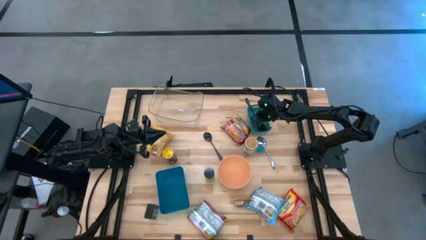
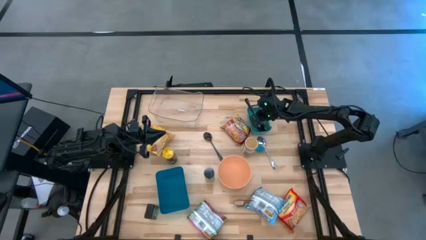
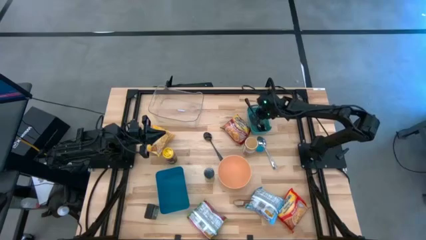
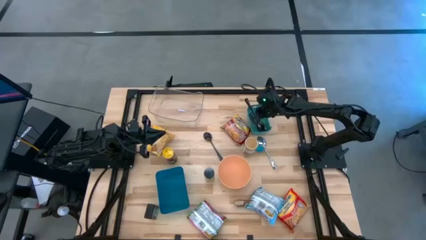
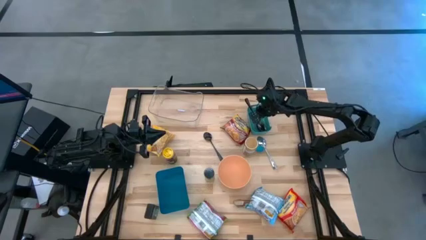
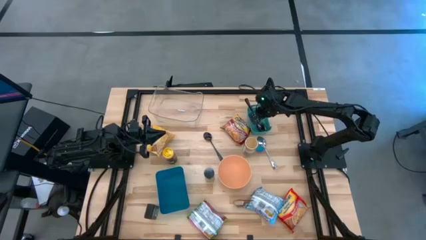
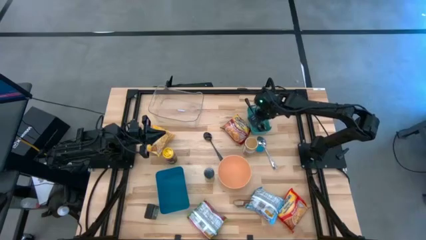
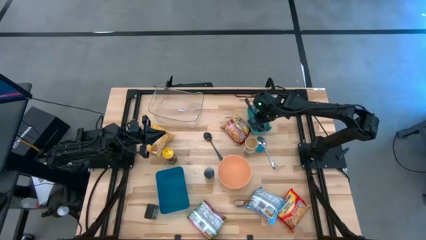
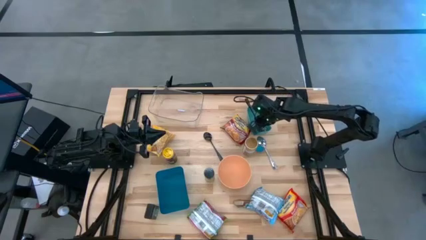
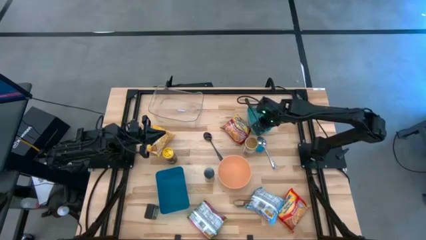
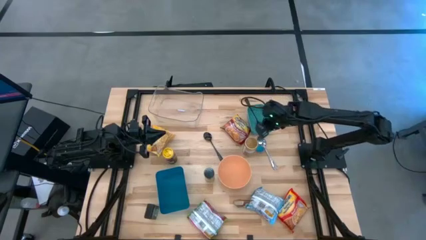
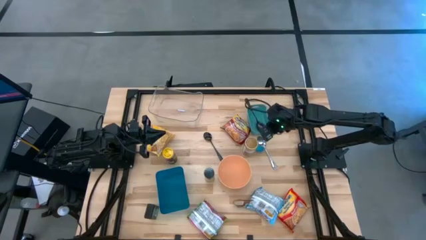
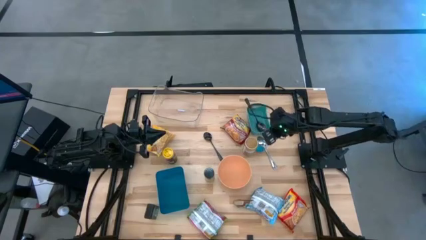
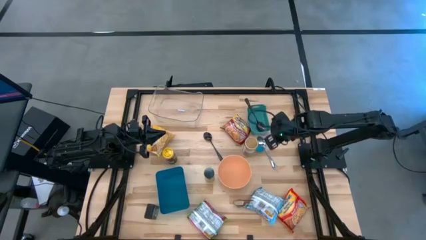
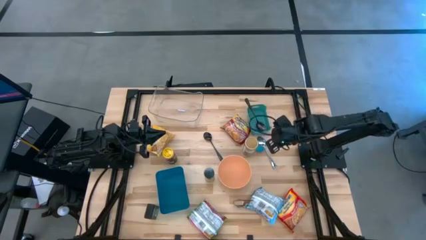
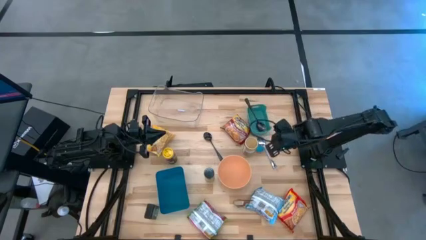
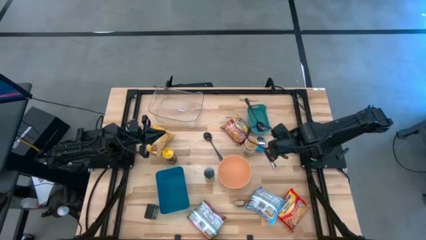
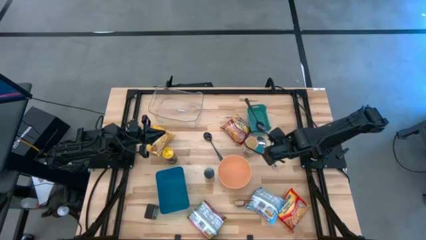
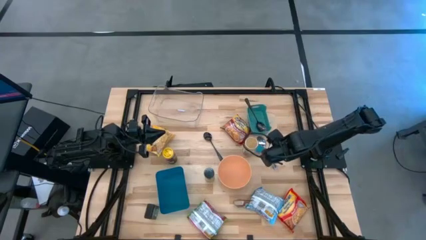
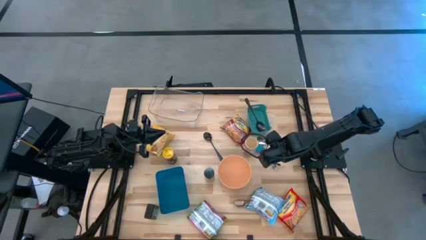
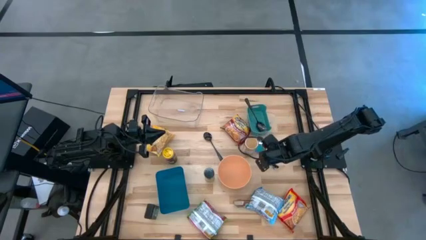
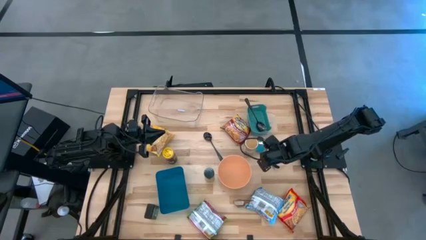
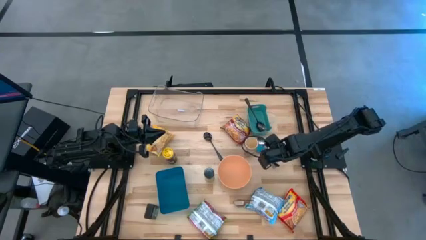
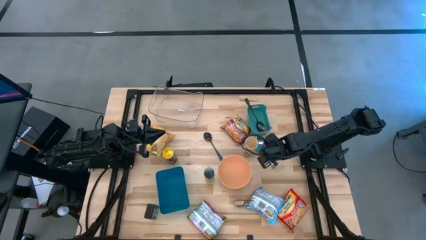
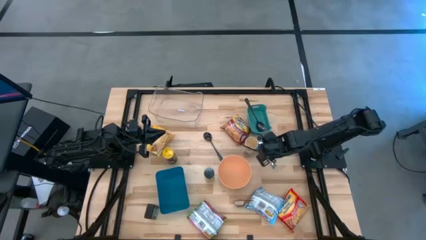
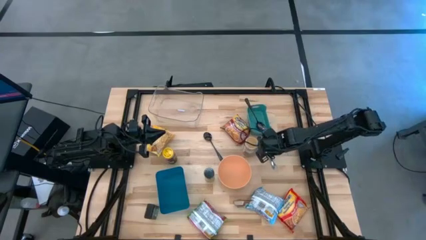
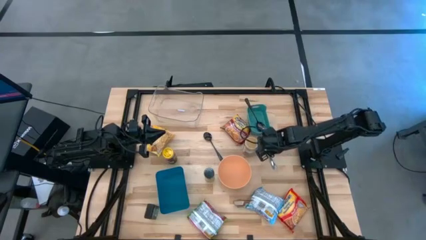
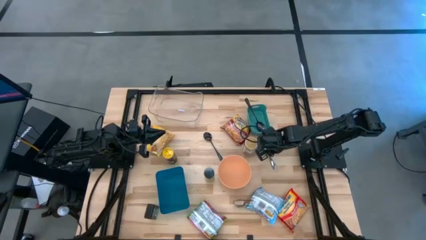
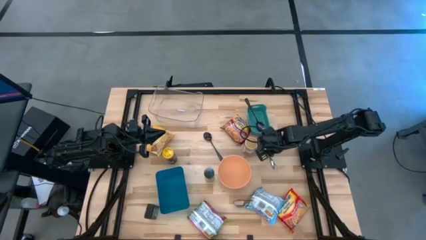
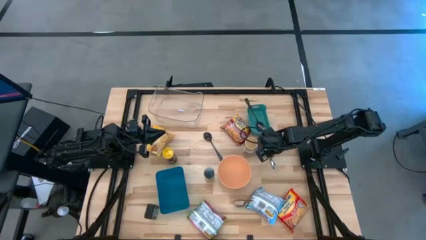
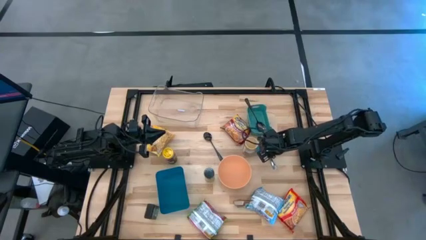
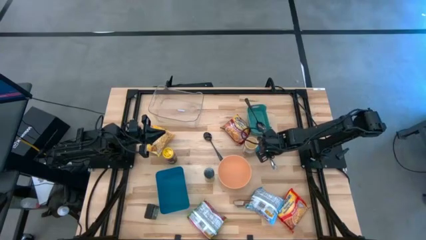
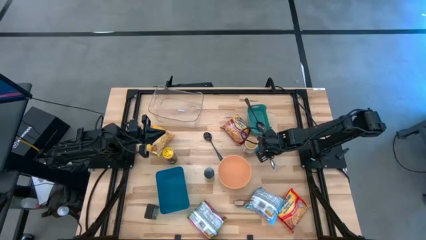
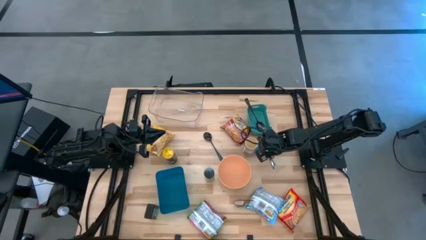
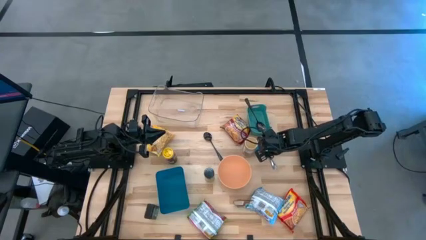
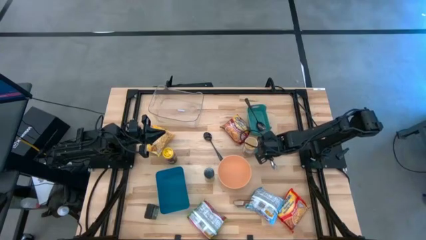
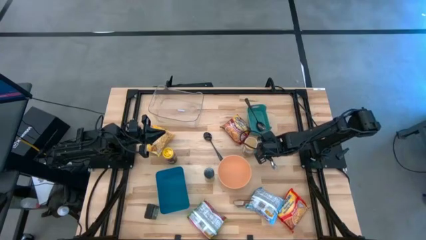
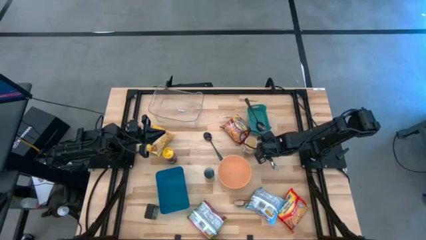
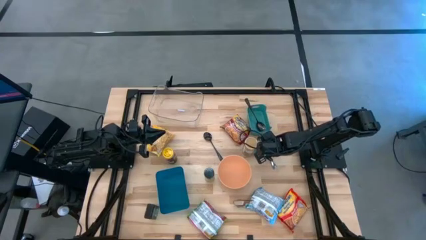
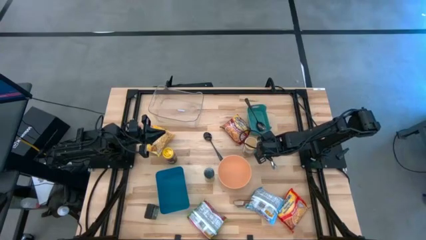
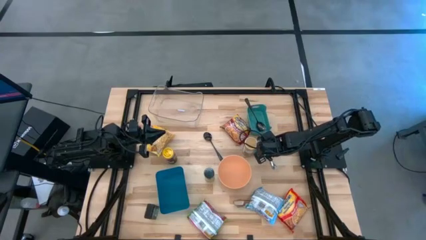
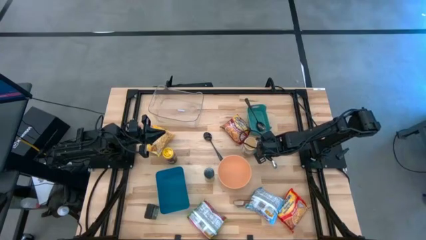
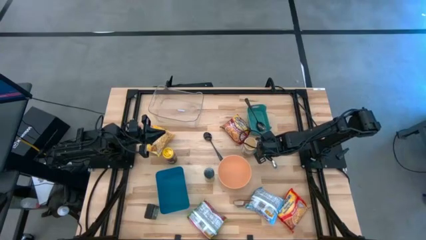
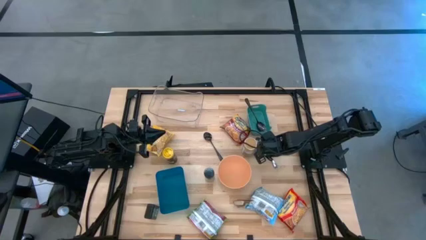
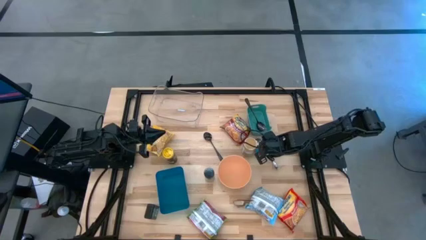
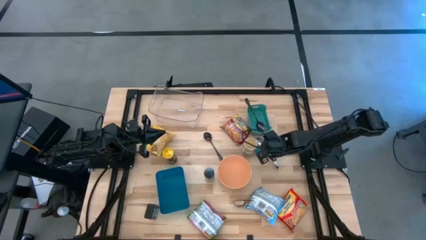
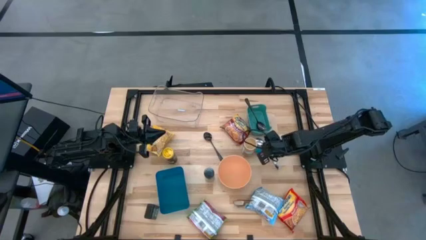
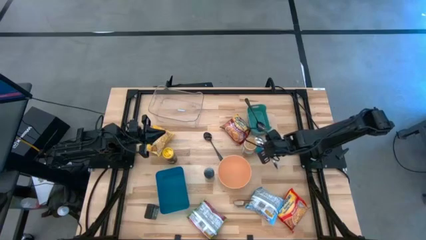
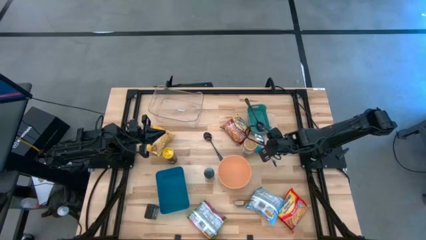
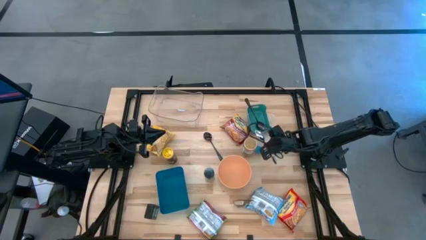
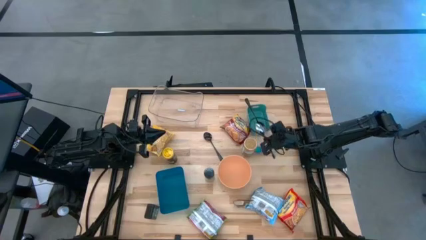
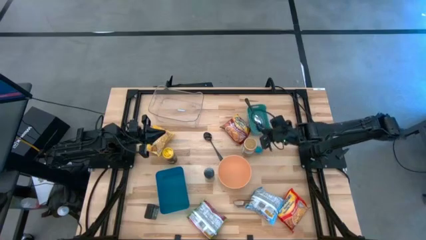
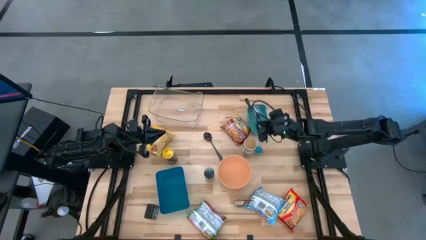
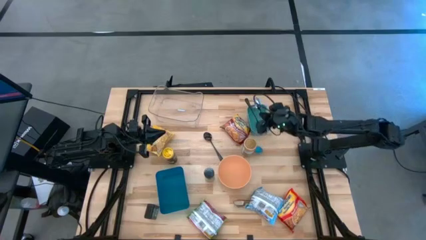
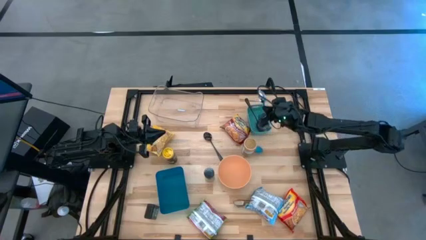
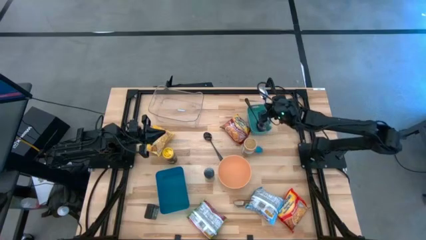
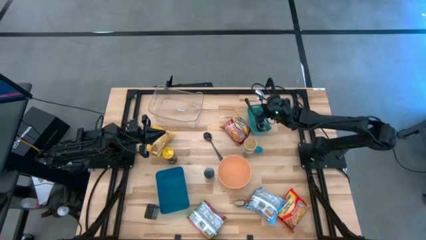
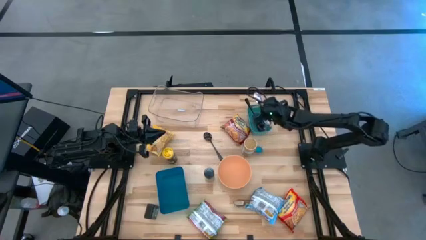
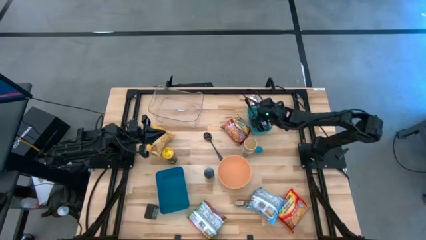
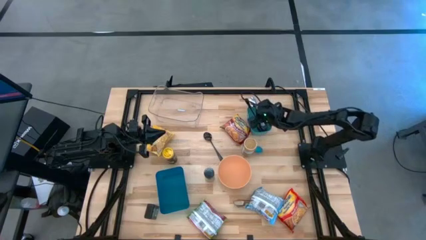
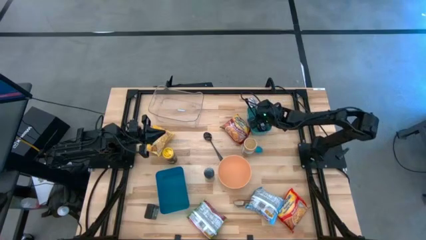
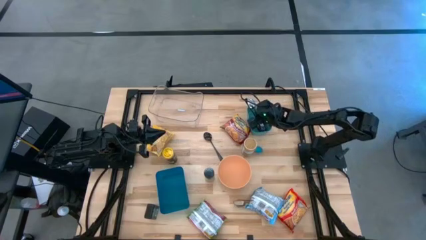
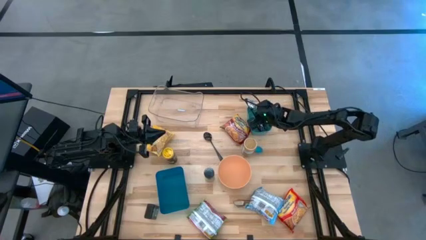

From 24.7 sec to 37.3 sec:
Task: Pick & Place Food Item
Put the silver spoon into the green bin

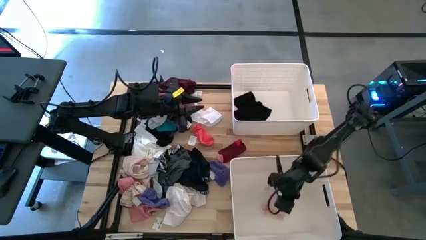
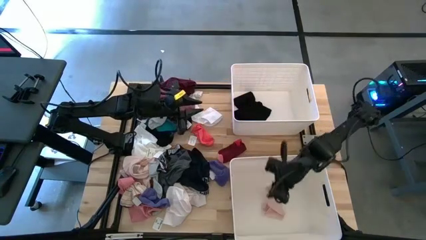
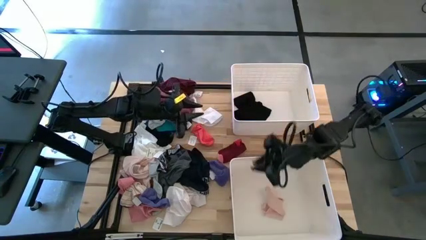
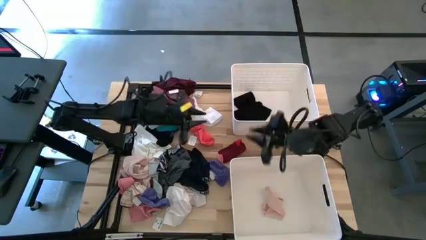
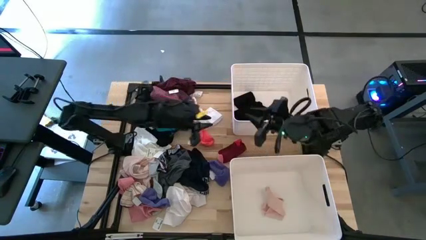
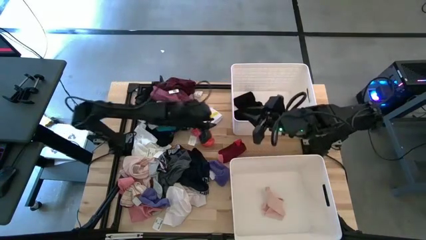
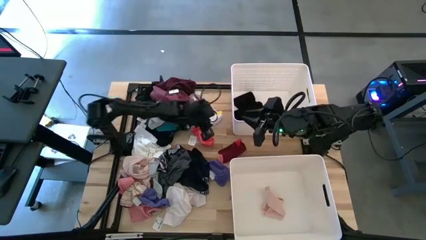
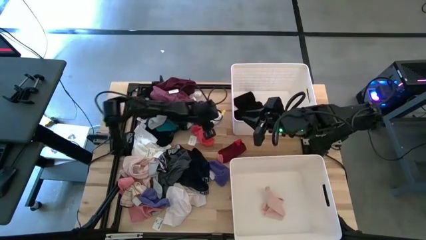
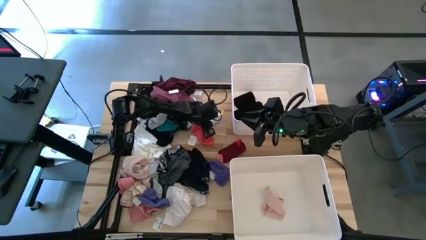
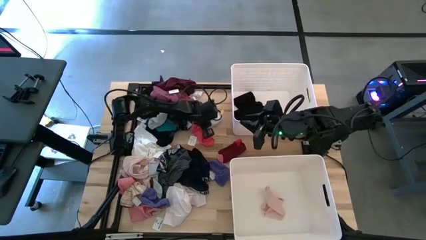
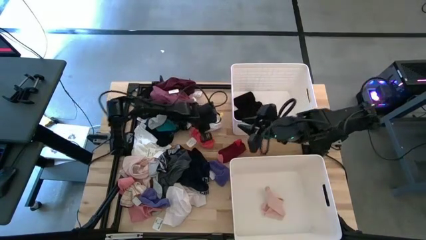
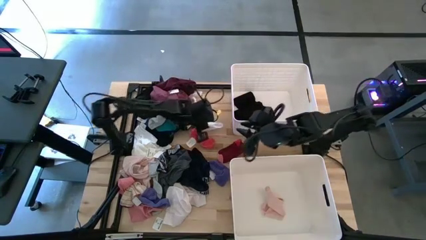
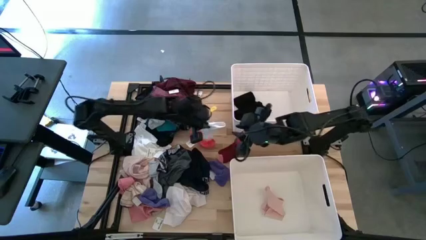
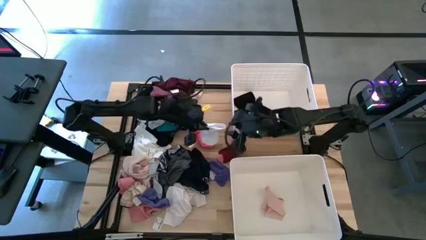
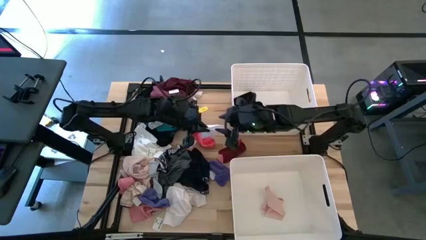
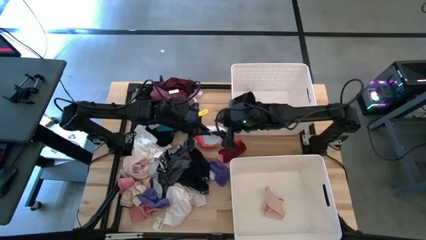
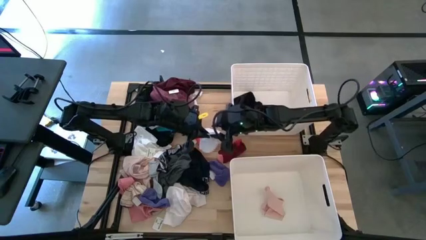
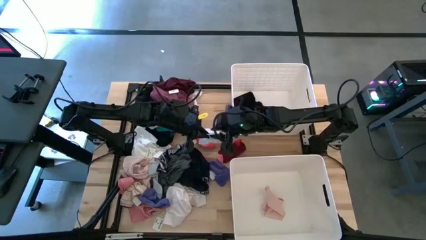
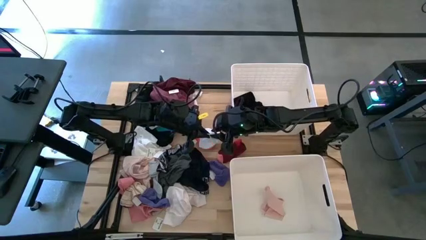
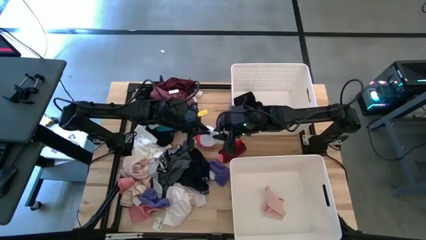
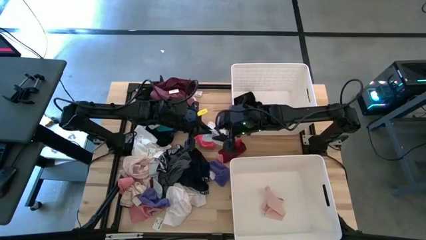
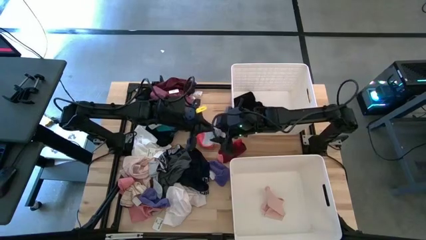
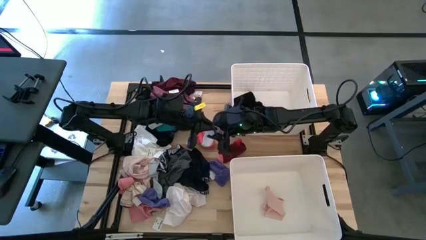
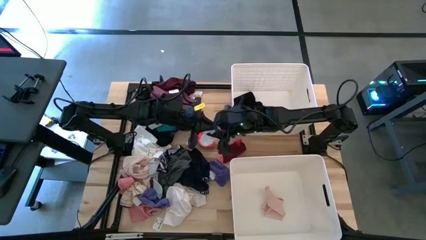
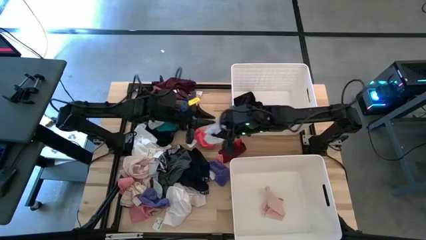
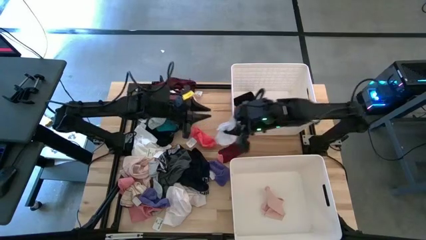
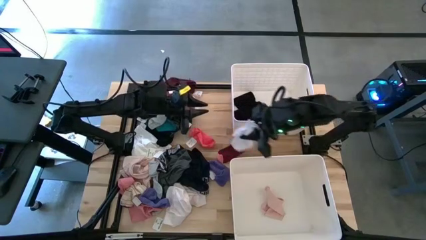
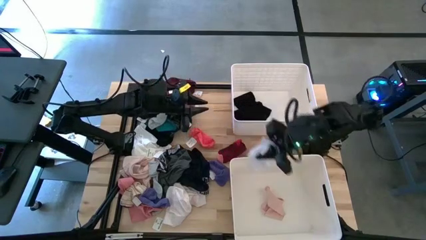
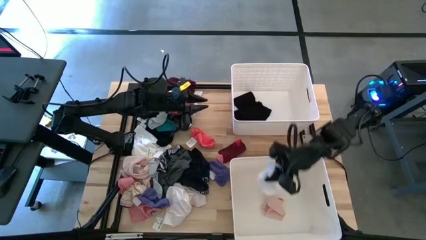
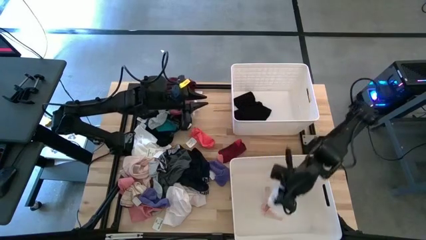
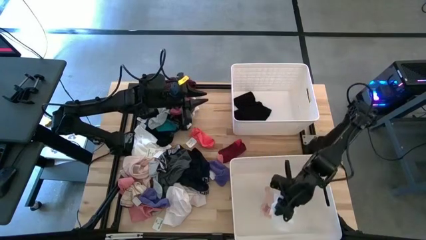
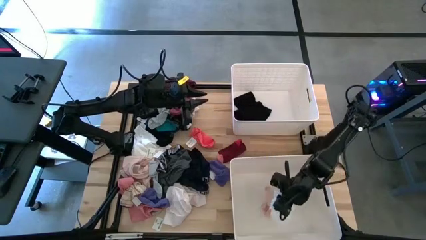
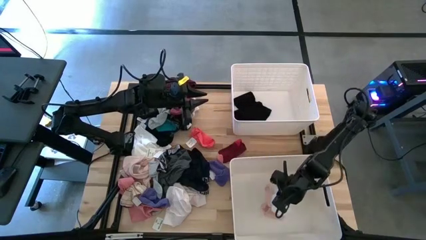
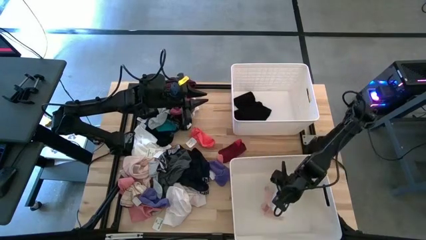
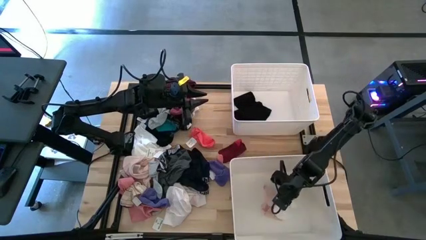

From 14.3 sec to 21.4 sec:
Task: Sort clothes
Put the white sock into the bottom bin
